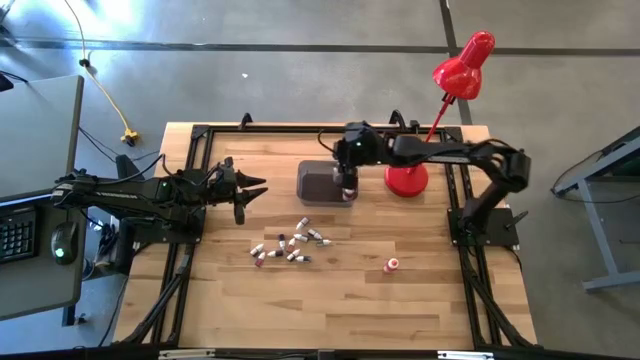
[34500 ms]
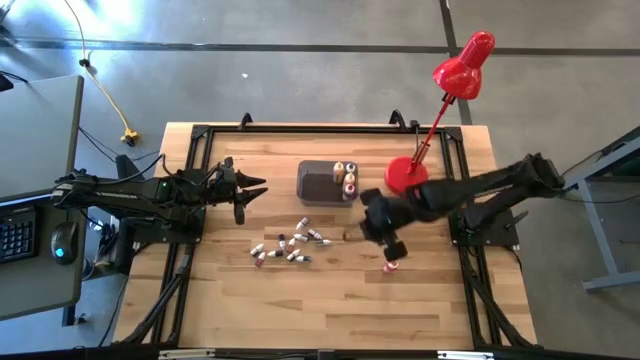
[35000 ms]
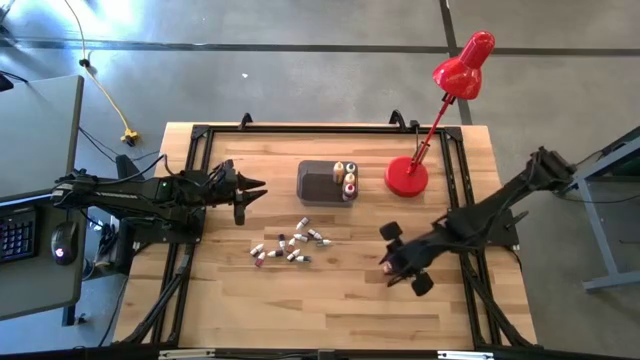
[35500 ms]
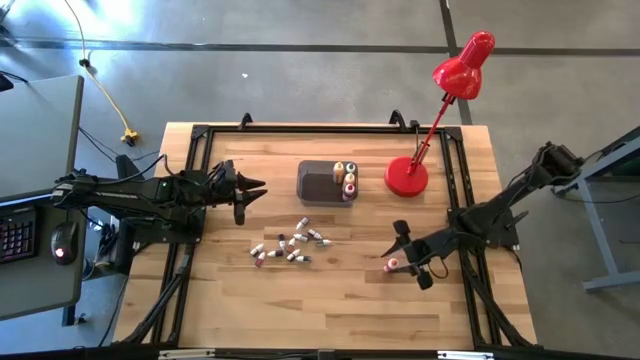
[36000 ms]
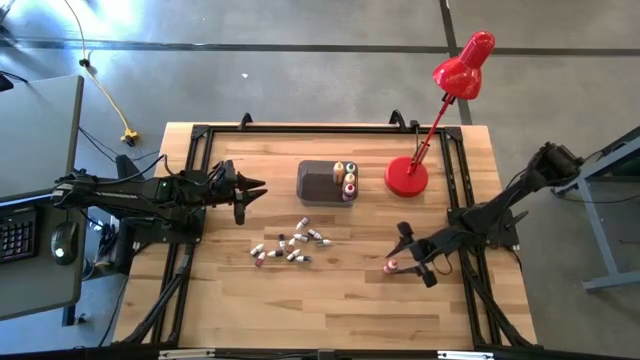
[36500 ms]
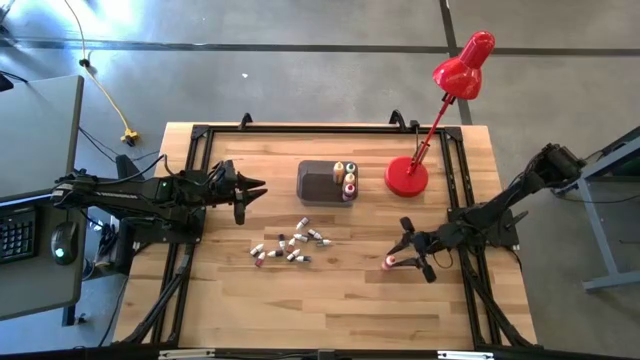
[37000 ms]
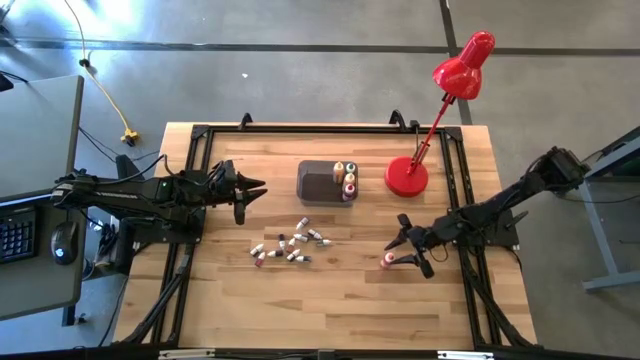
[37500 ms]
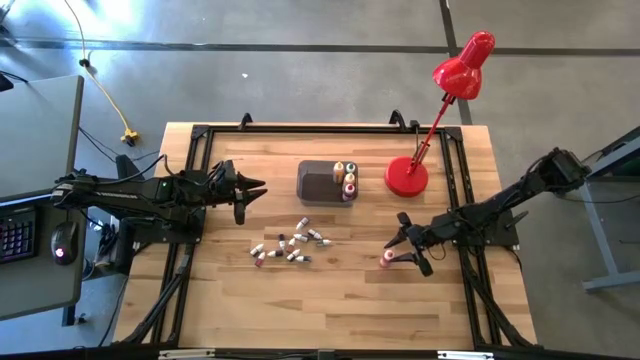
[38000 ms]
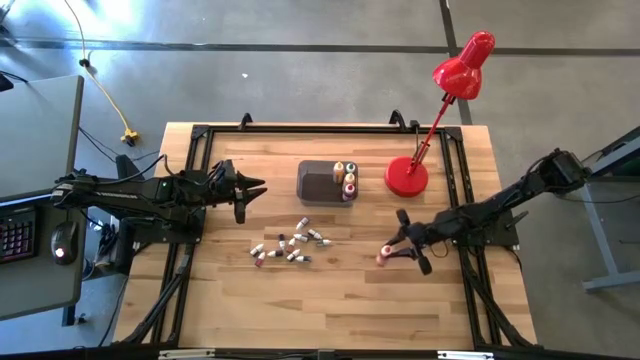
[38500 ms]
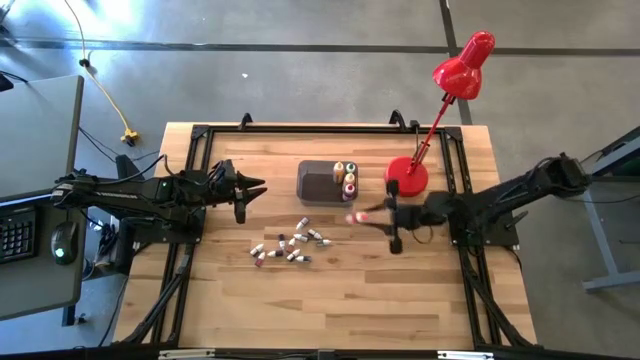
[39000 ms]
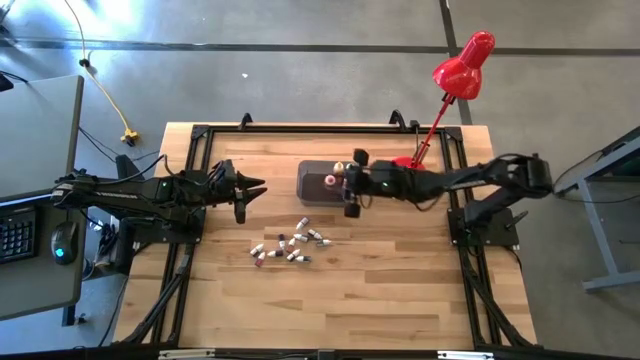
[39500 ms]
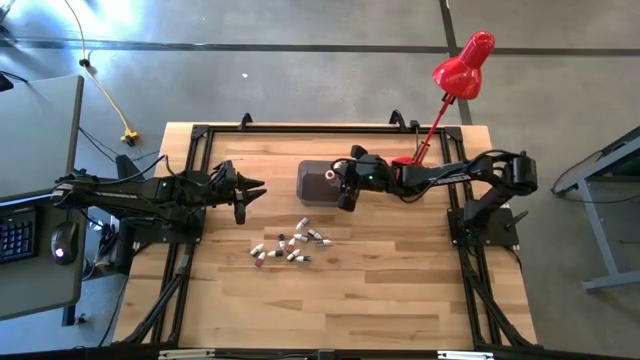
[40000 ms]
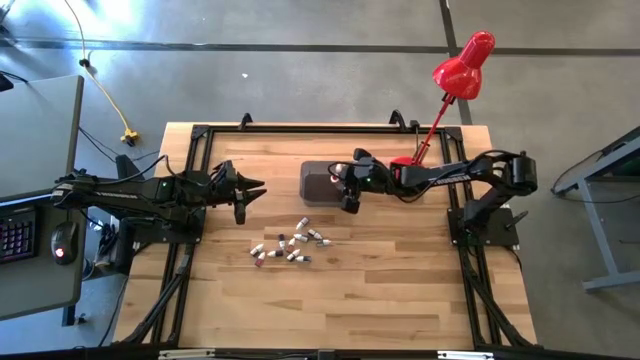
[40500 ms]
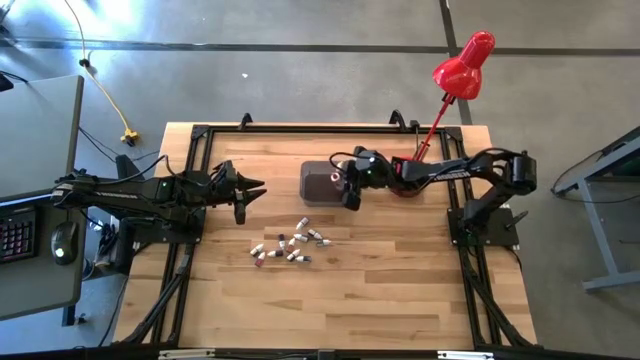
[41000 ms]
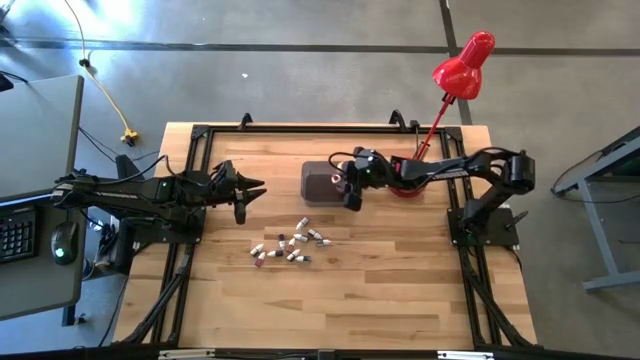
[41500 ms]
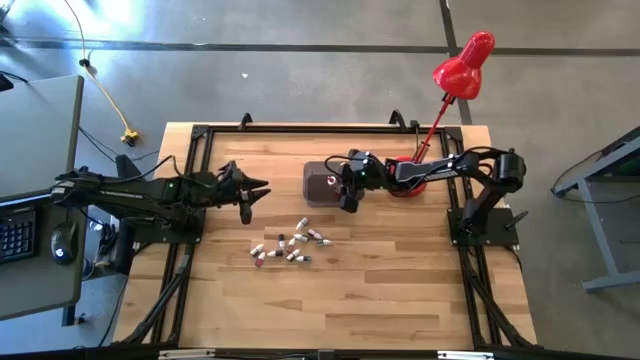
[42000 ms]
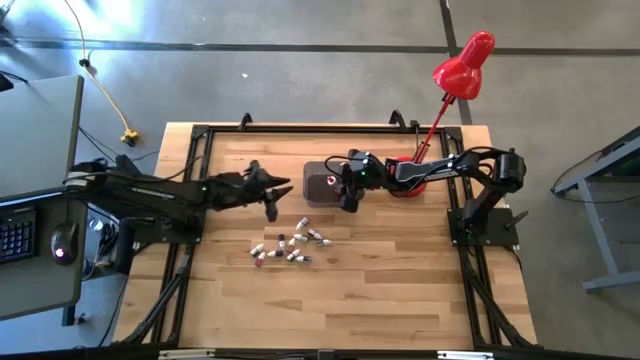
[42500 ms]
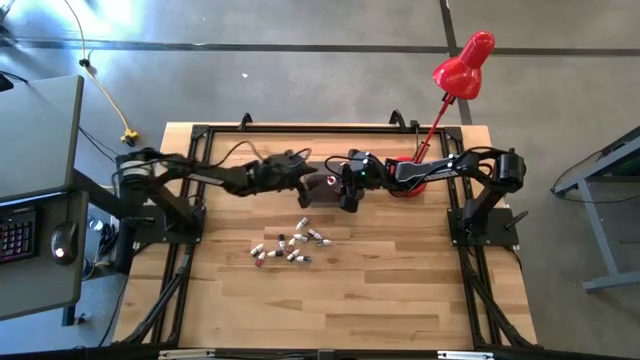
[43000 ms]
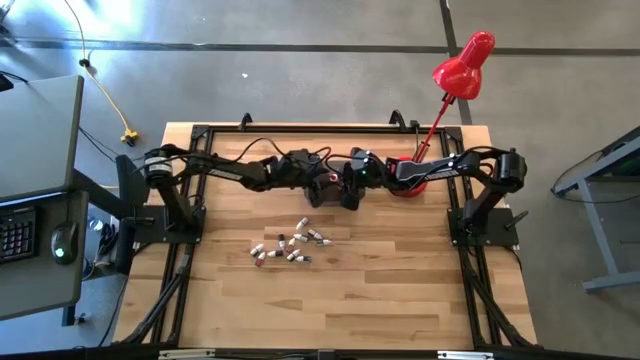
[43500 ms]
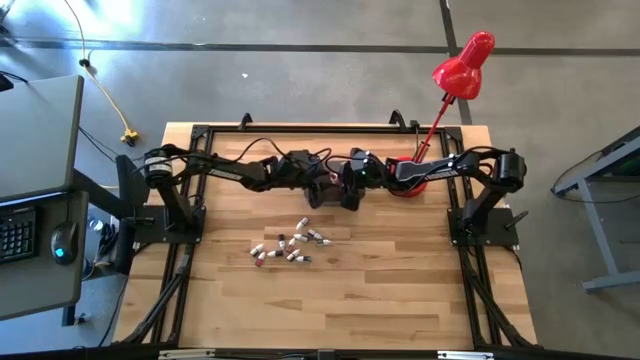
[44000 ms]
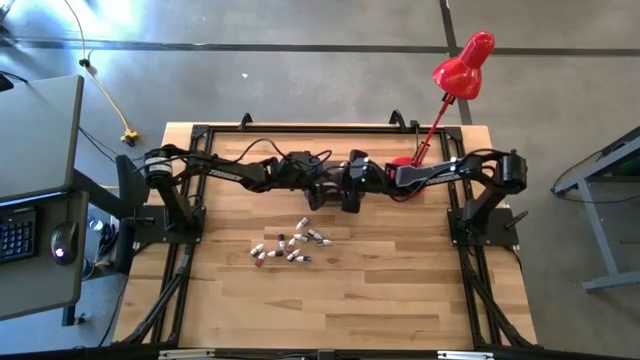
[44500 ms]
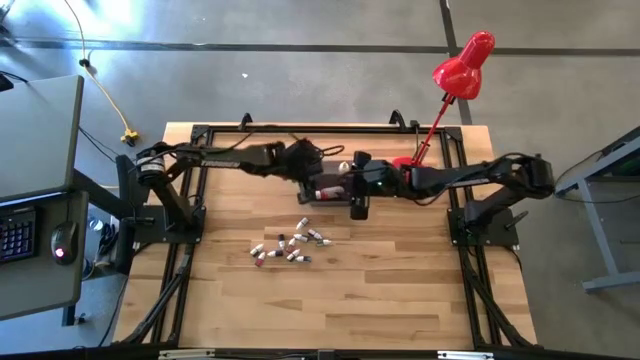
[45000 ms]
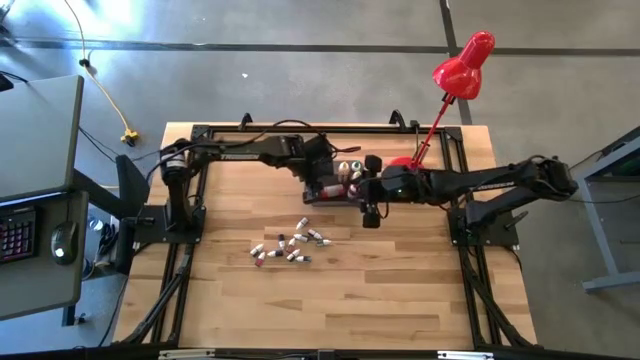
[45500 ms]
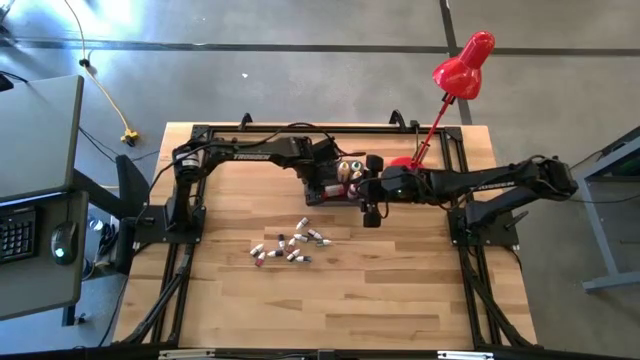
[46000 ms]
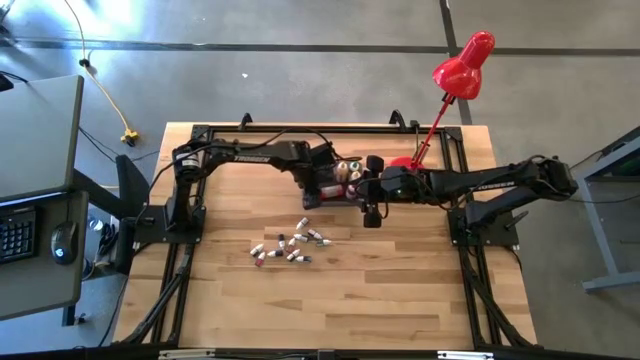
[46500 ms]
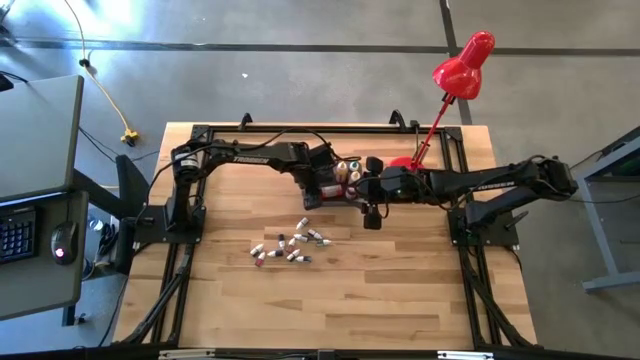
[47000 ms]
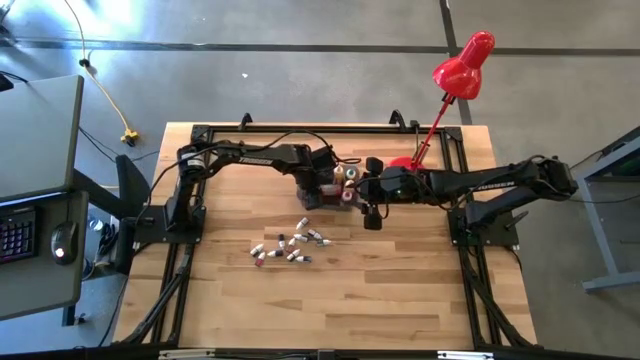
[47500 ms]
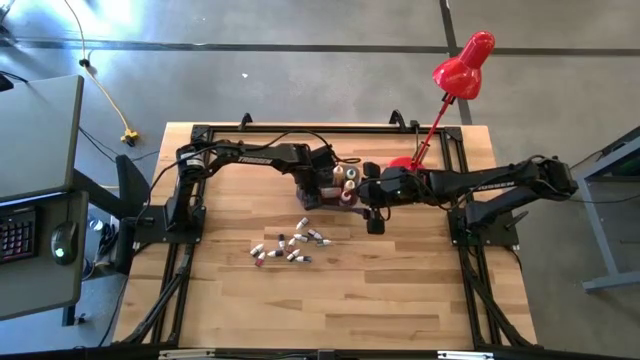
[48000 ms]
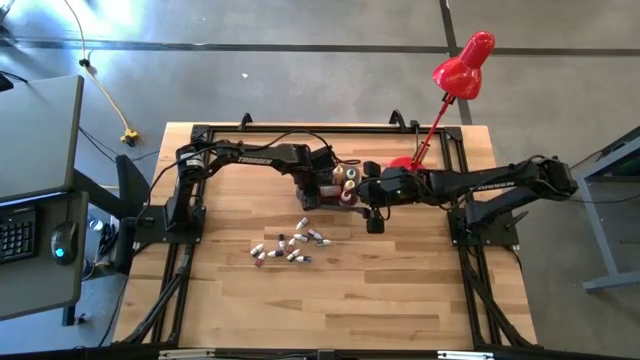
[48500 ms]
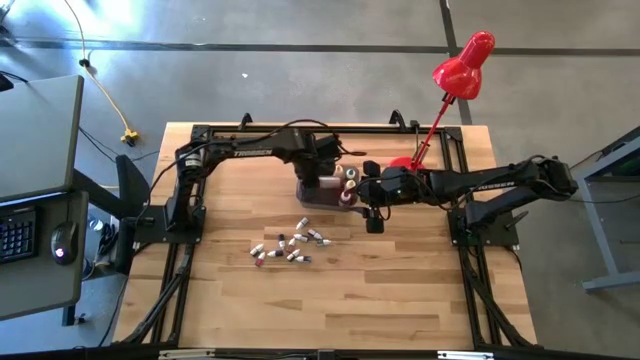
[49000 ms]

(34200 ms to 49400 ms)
Task: Pick & Place food coloring
Put the big orange food coloring bottle into the black bin

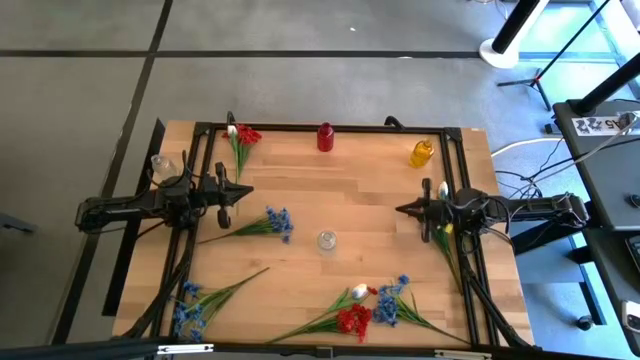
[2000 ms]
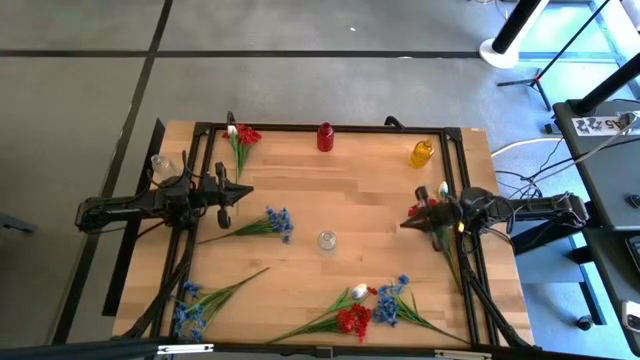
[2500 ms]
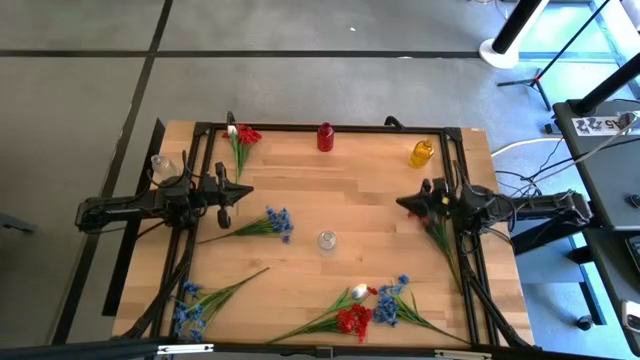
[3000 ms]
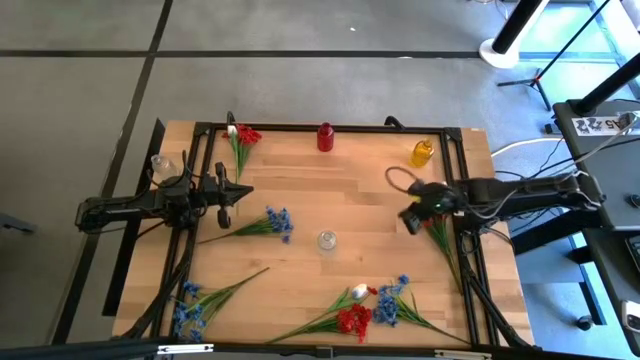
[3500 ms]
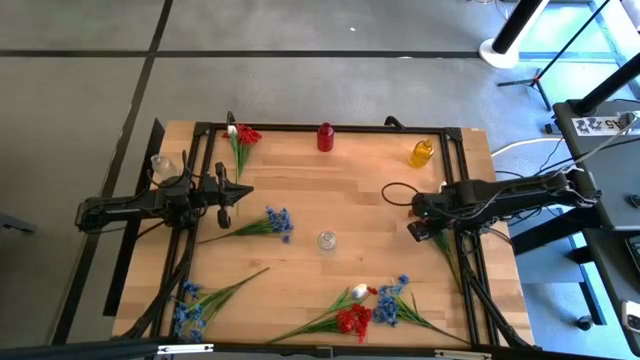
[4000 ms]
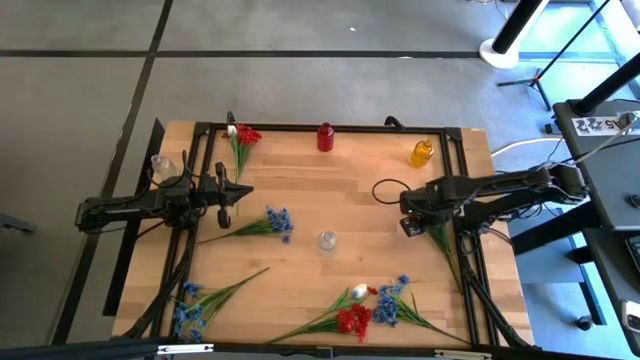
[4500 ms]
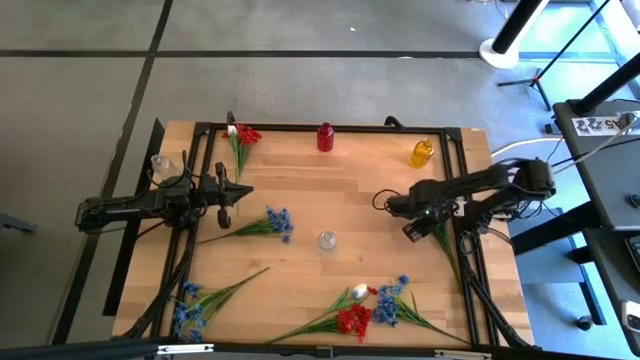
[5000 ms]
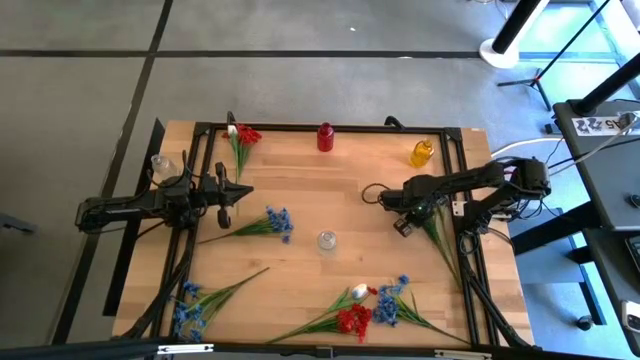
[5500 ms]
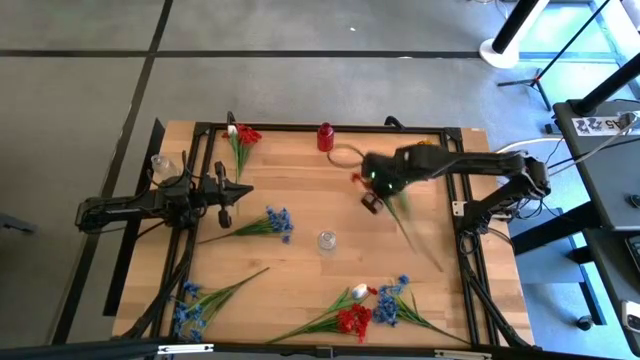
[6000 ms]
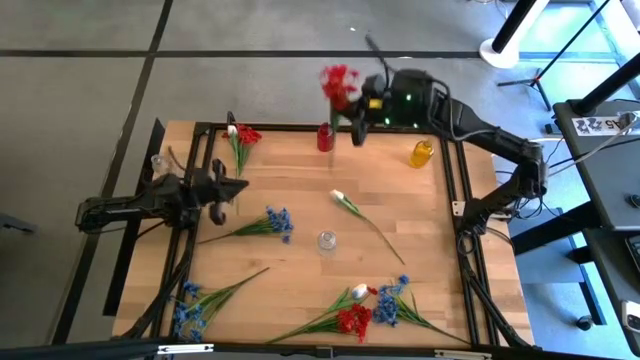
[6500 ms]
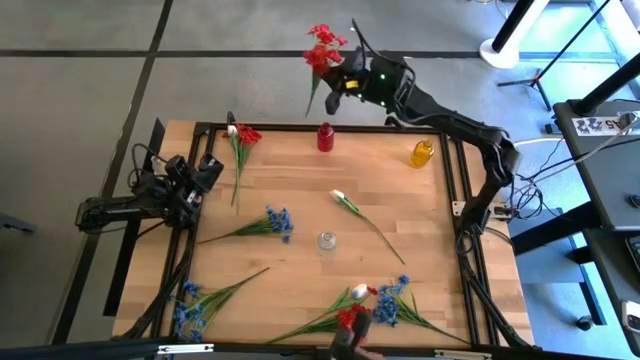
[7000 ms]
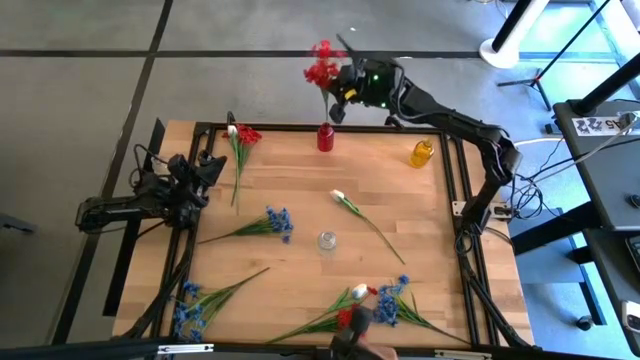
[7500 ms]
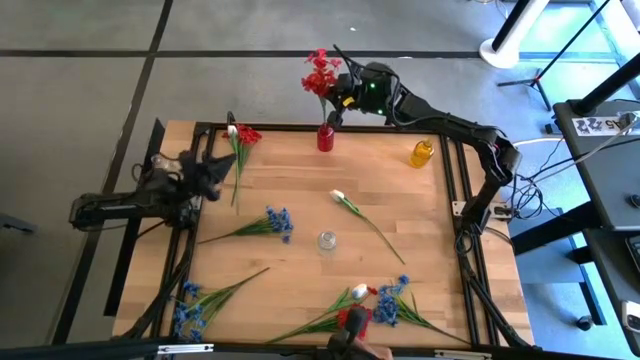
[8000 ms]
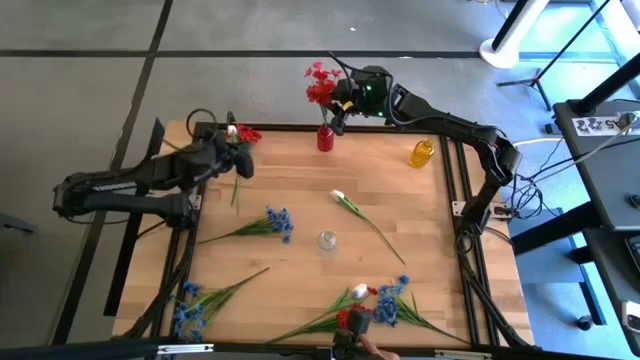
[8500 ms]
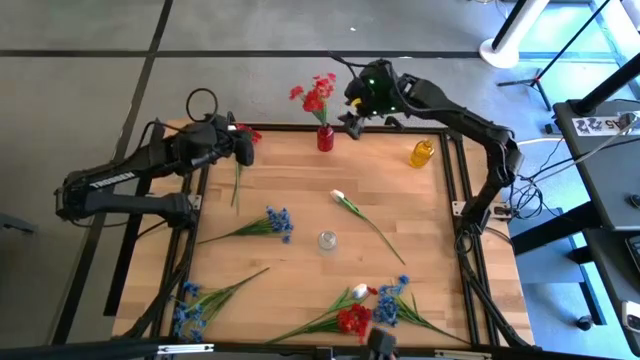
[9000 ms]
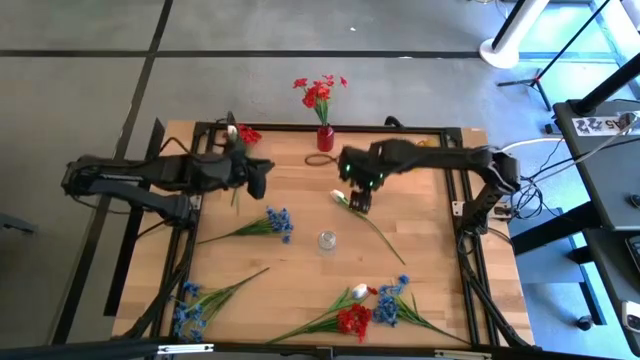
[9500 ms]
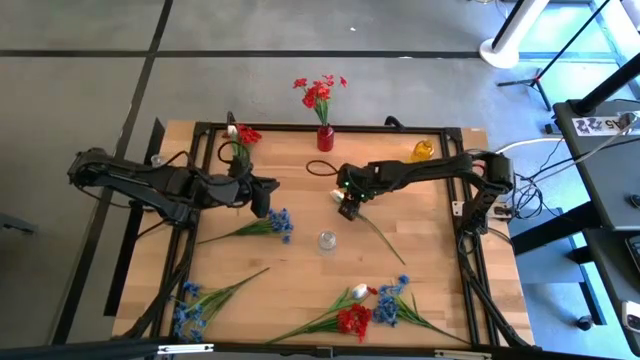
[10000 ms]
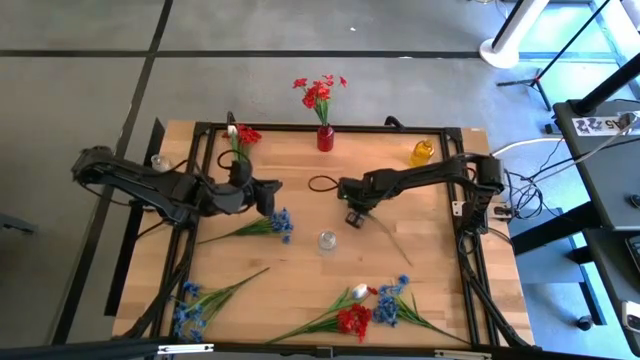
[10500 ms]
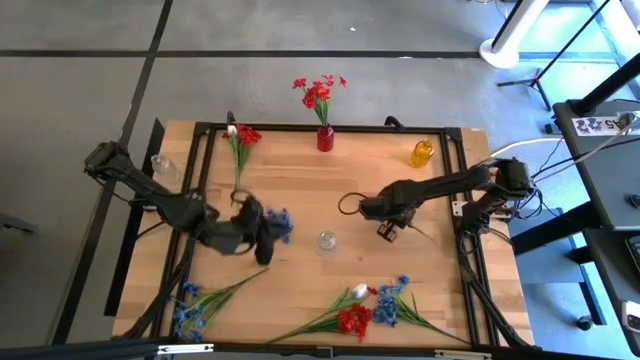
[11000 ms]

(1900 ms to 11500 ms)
Task: Sort flowers into vase by color
Put the red flower into the red vase
